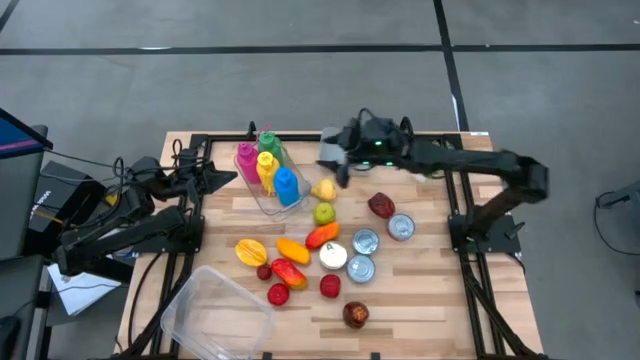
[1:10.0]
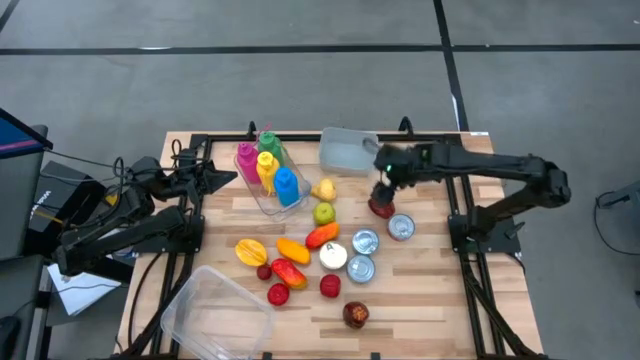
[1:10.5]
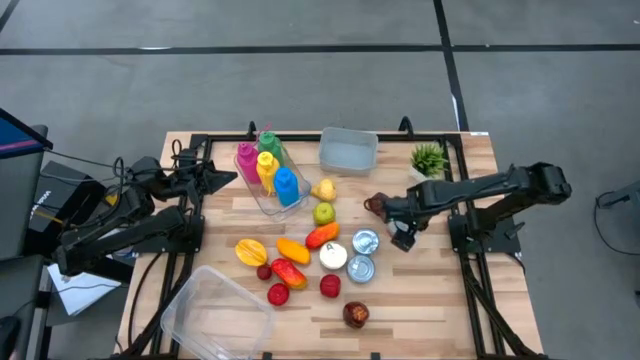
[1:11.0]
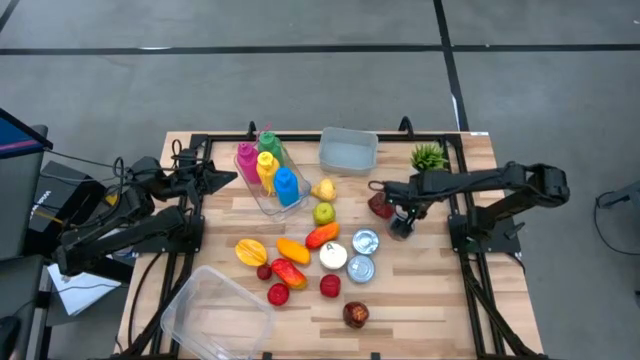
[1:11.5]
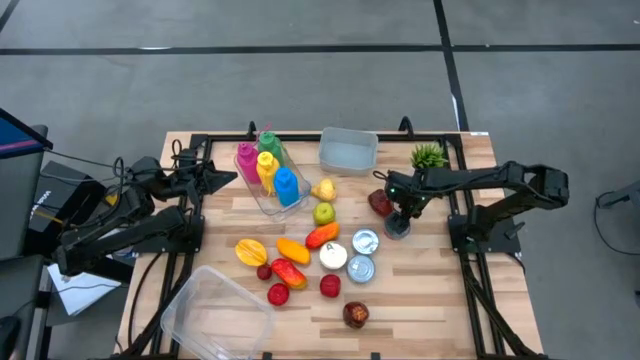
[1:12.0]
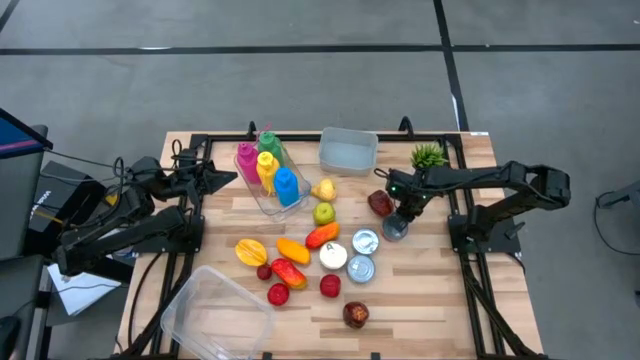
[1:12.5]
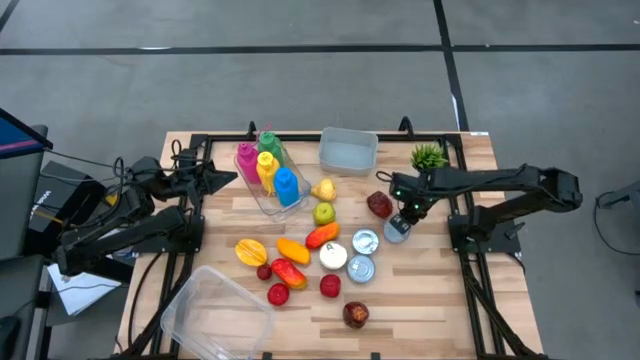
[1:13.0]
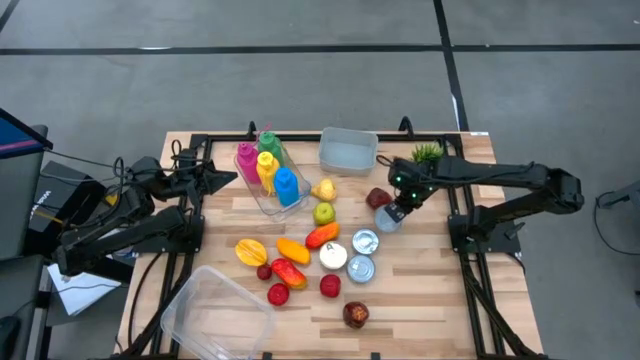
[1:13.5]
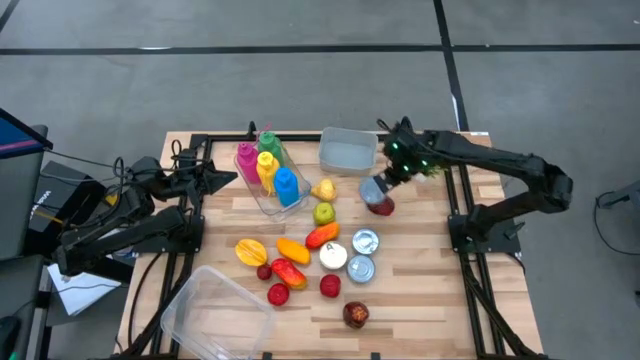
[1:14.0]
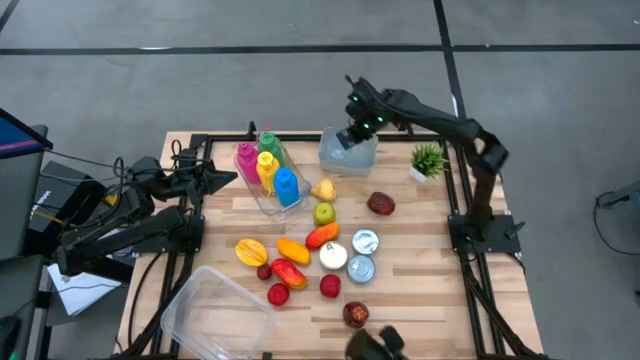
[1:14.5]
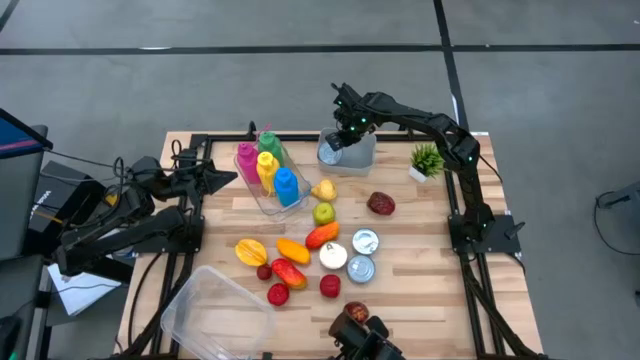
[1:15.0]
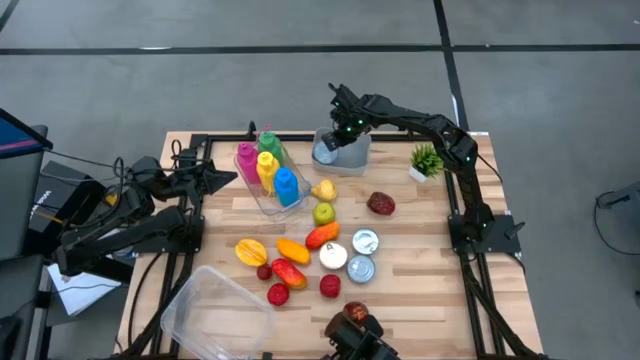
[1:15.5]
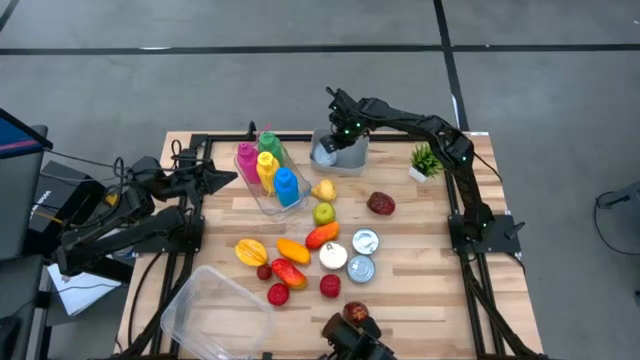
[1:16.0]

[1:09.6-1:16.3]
Task: Pick & Place Food Item
Put the red tuna can into the gray bin

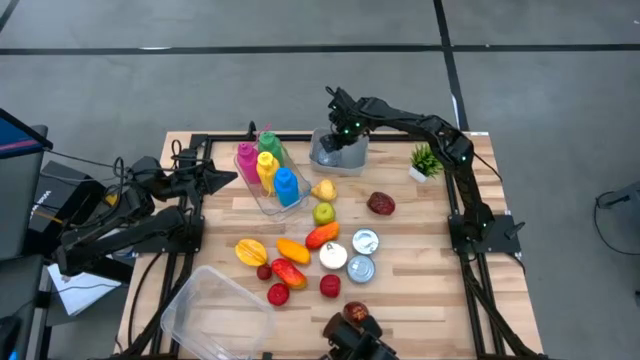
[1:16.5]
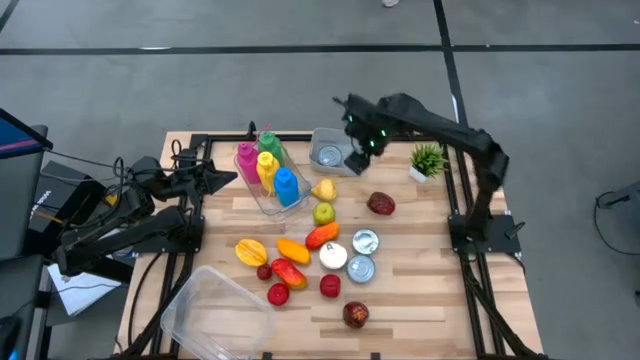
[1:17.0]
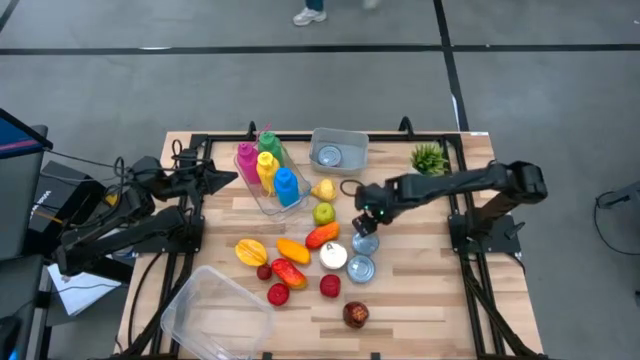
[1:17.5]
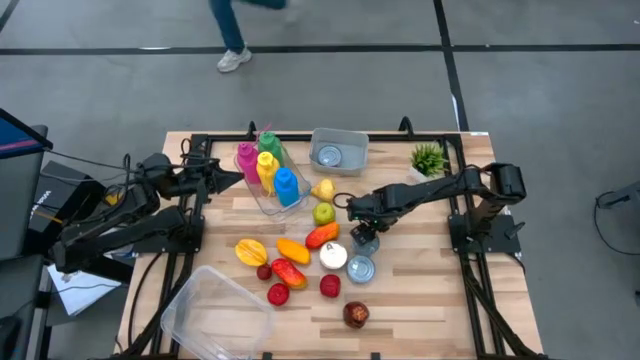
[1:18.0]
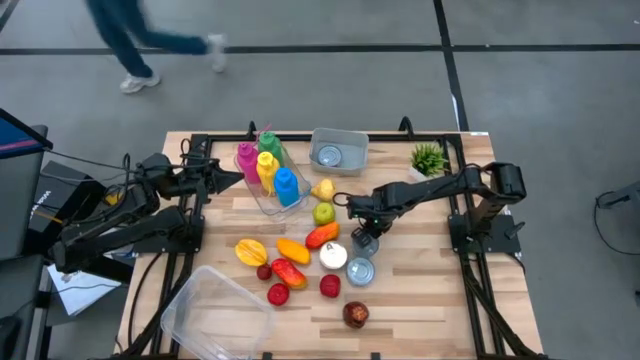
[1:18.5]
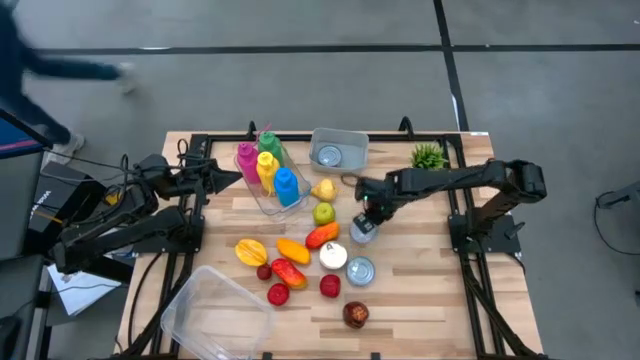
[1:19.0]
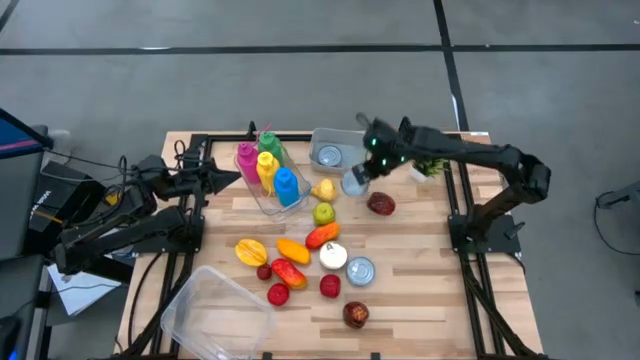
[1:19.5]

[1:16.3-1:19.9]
Put the green tuna can into the gray bin

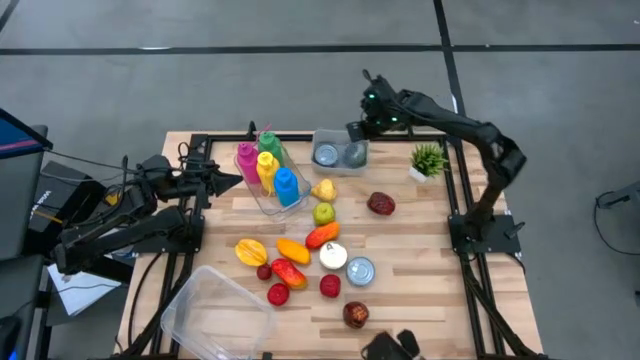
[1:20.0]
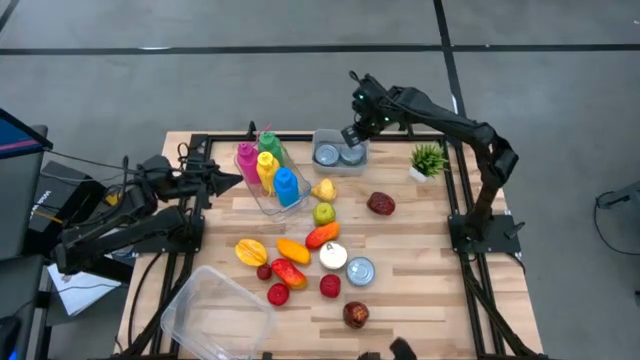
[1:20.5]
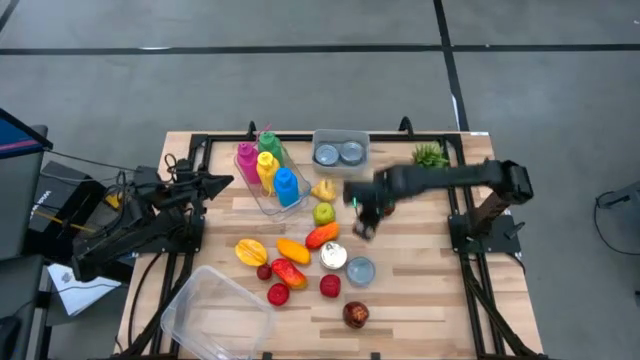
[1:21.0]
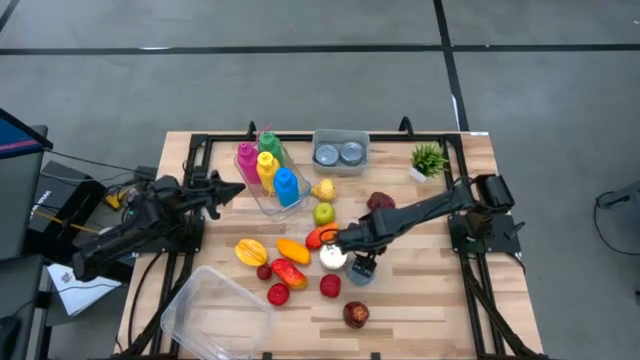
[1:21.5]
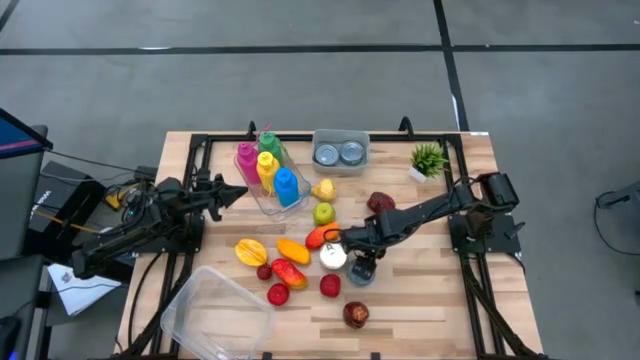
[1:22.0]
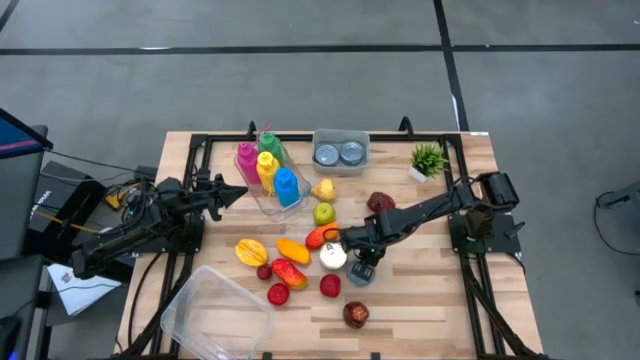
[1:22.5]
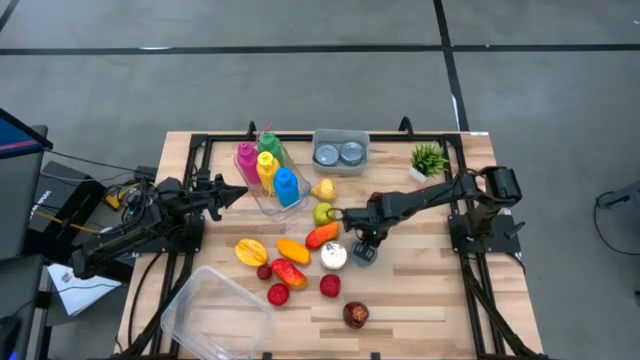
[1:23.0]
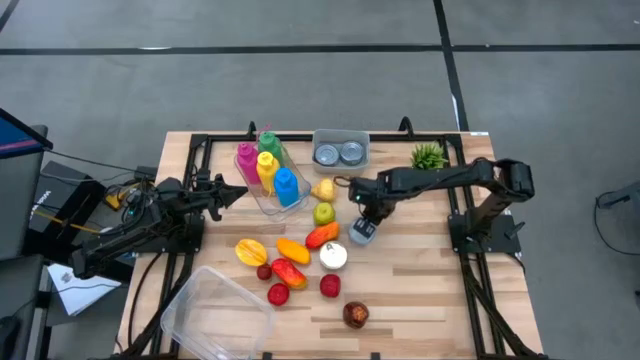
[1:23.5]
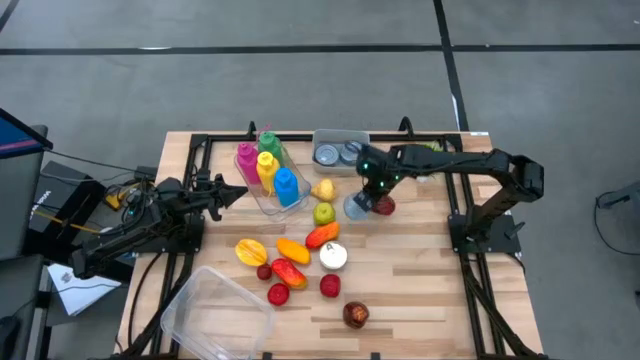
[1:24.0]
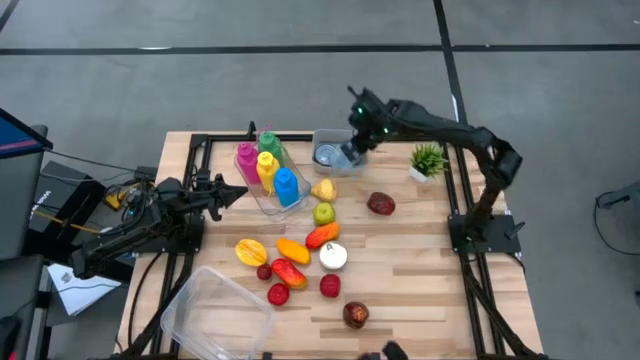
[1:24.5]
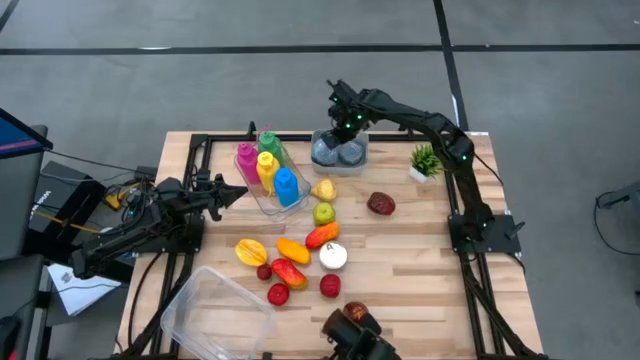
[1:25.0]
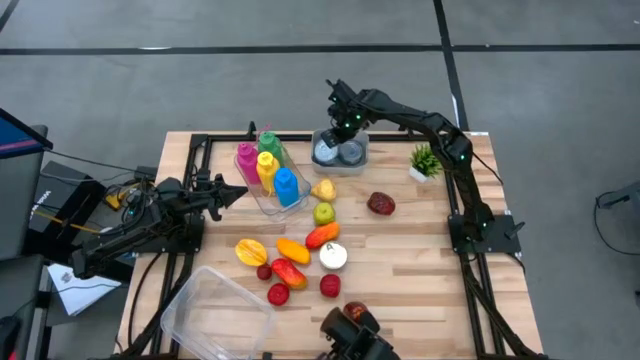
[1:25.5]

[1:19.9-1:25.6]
Put the blue tuna can into the gray bin

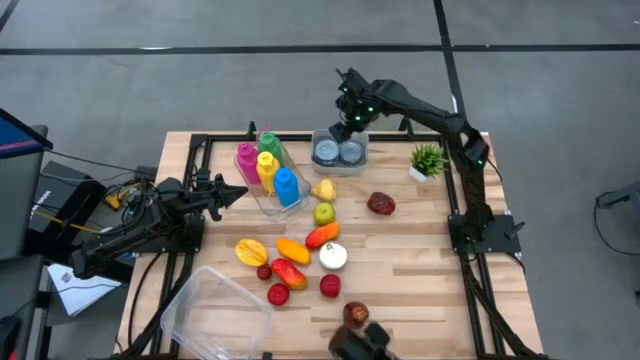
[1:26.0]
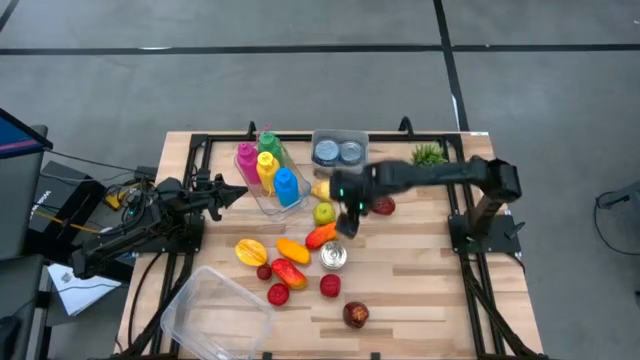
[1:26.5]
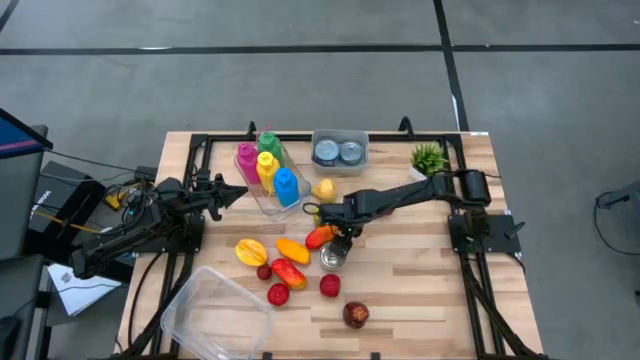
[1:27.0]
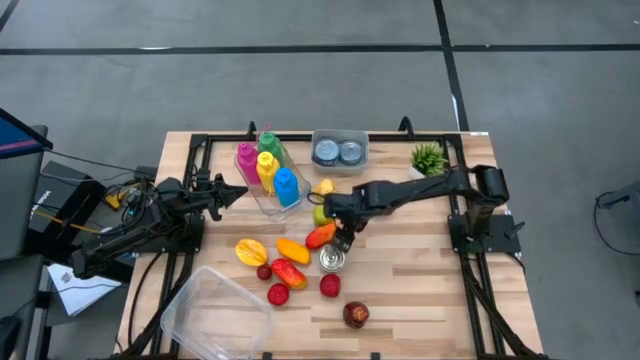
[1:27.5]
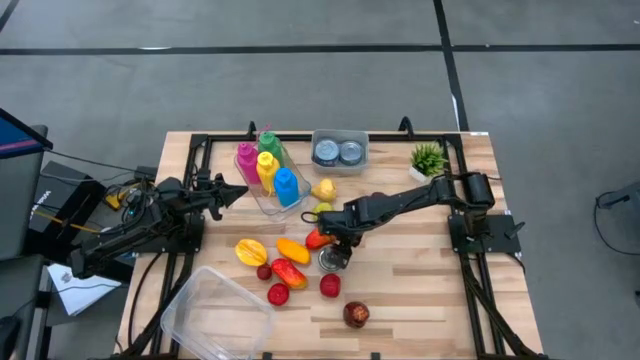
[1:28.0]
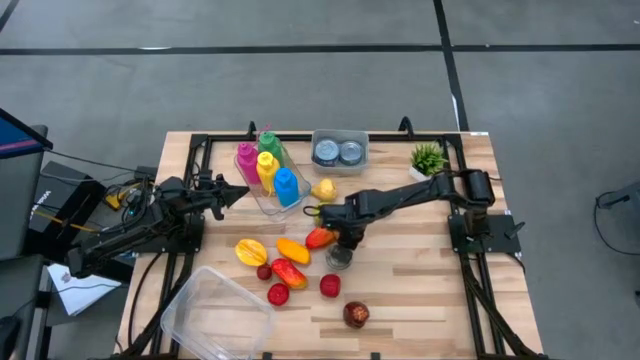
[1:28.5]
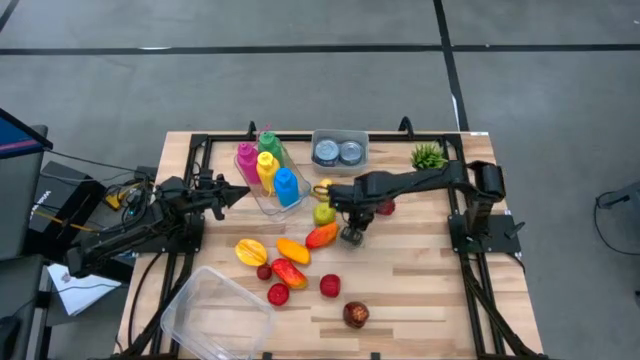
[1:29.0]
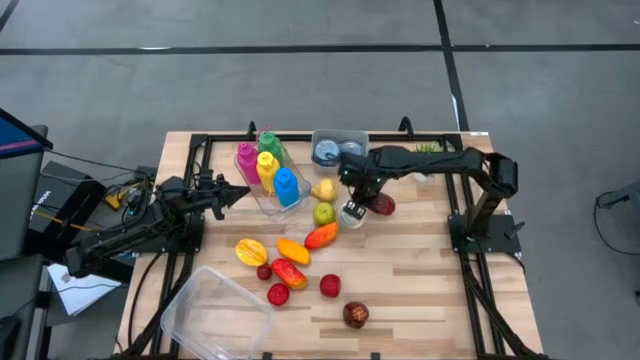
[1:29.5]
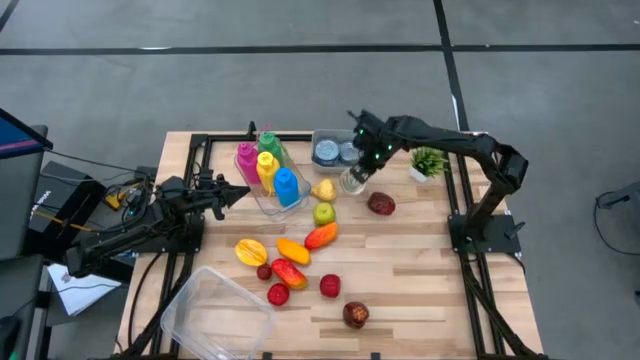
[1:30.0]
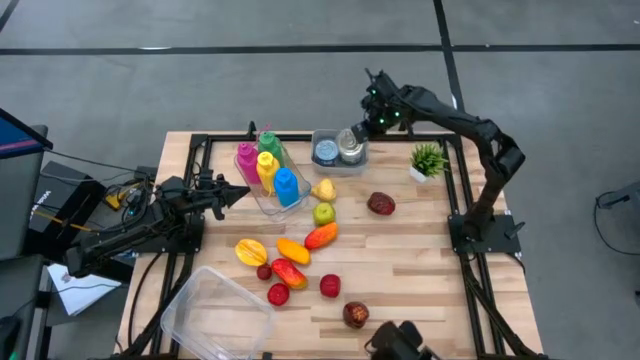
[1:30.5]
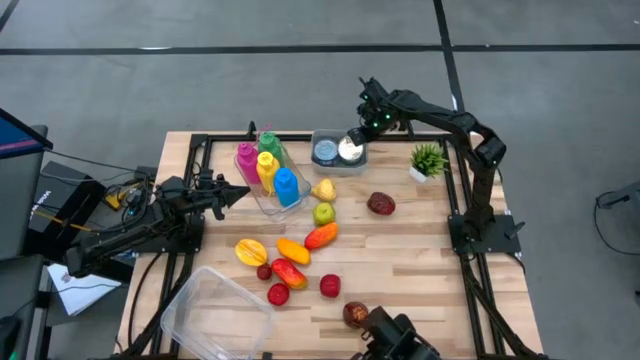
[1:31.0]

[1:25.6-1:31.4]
Put the blue and pink tuna can into the gray bin
